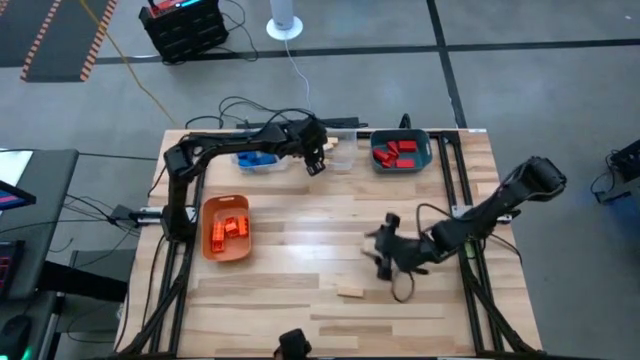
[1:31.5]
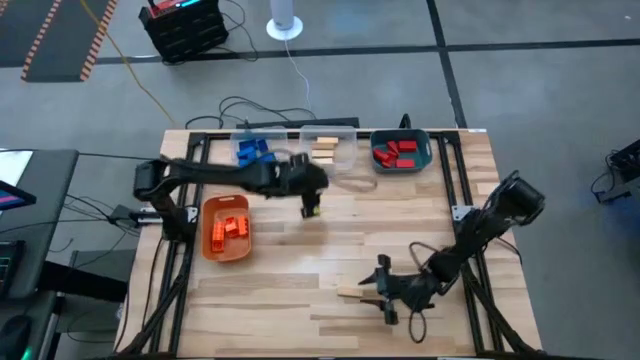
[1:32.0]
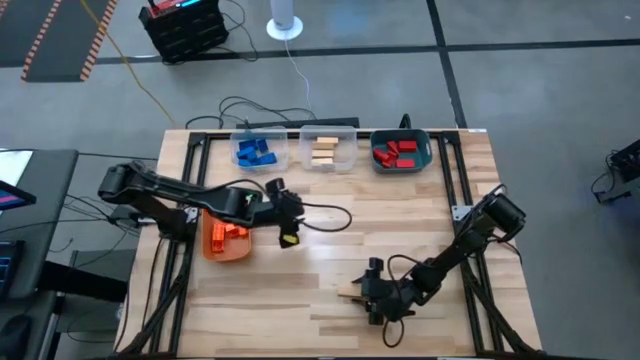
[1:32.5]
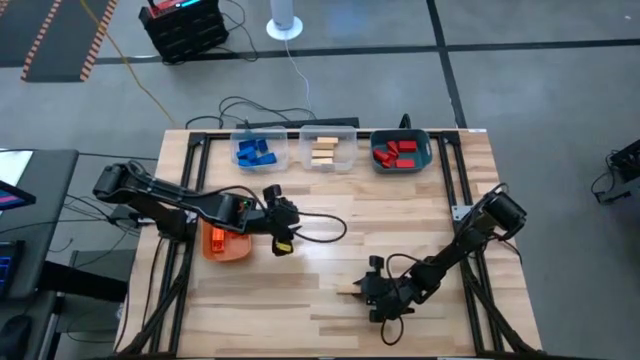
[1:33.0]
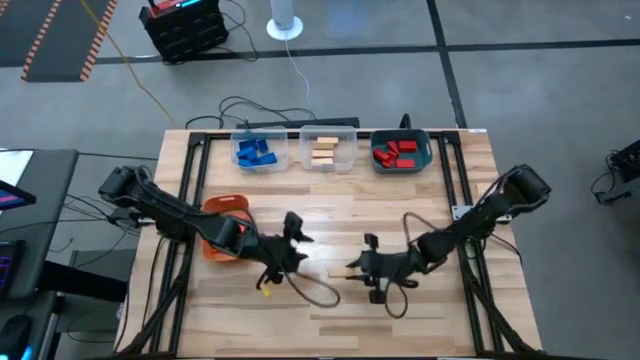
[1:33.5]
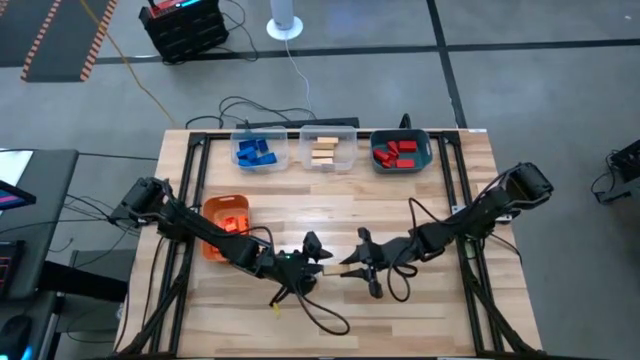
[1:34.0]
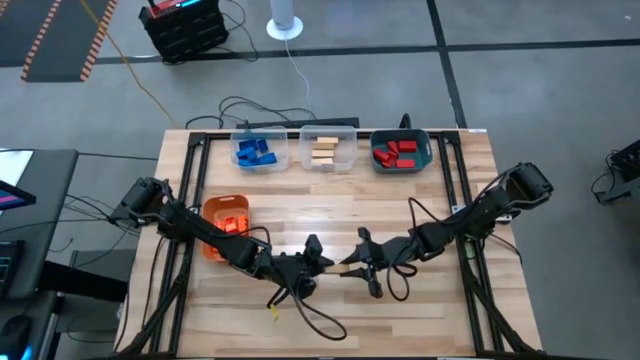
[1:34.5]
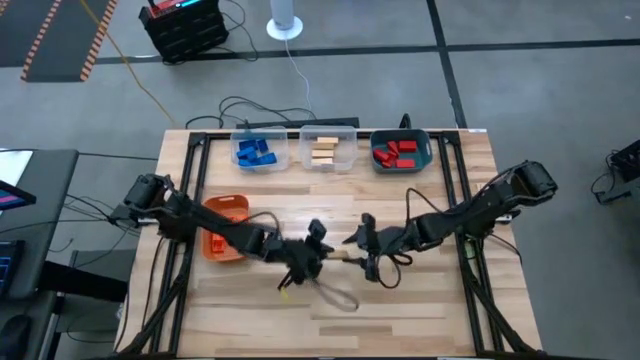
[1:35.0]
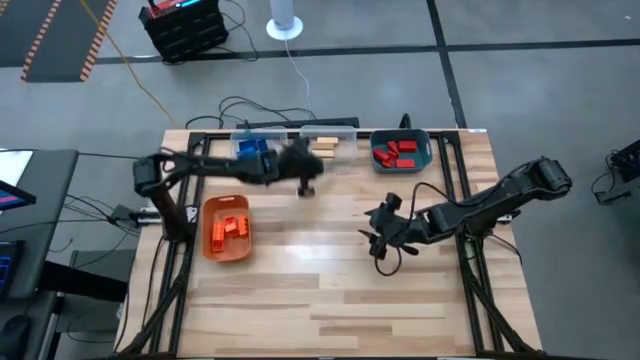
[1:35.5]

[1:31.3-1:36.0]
Task: Sort blocks
Put the light brown block into the right transparent bin

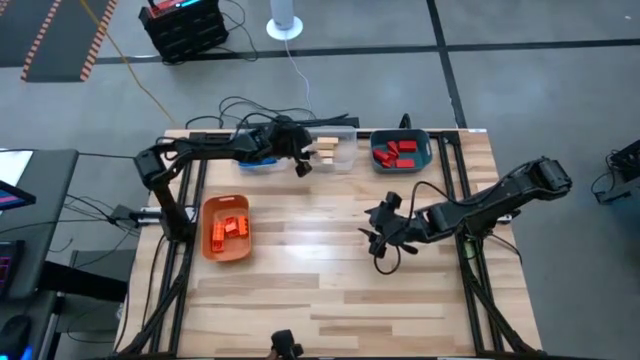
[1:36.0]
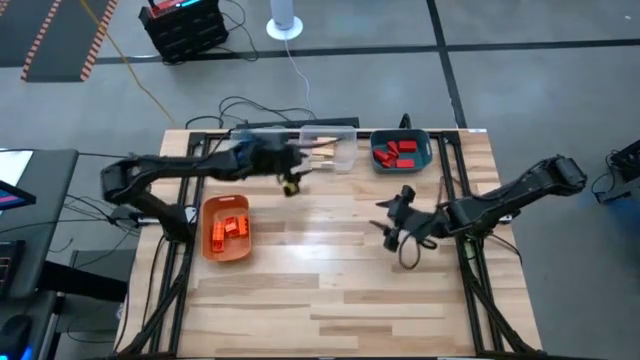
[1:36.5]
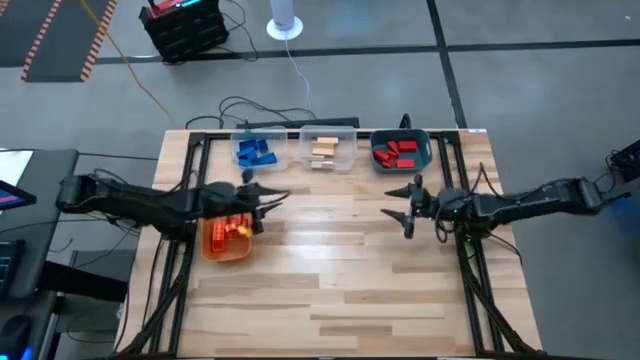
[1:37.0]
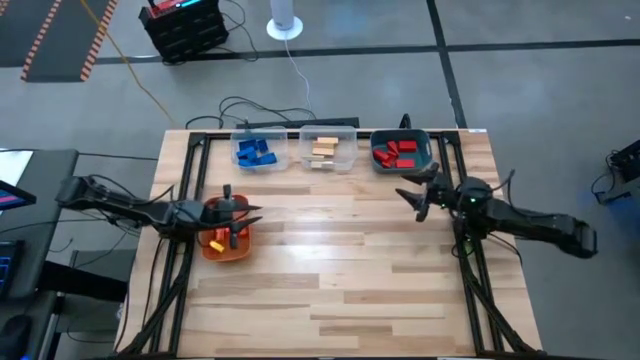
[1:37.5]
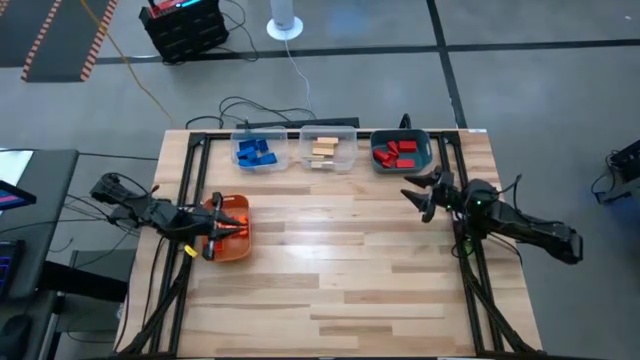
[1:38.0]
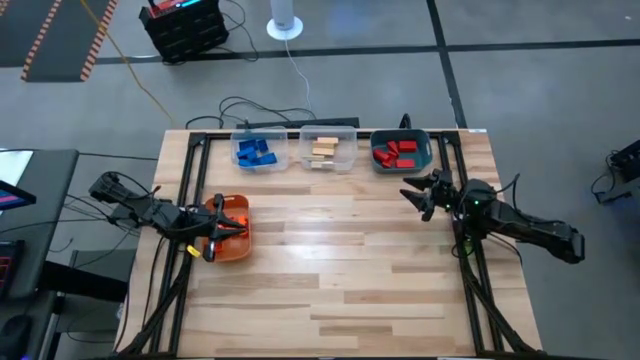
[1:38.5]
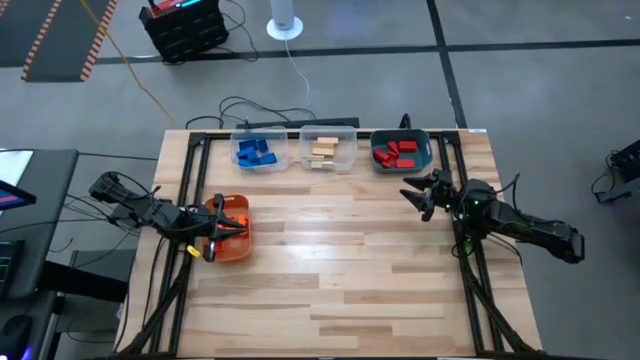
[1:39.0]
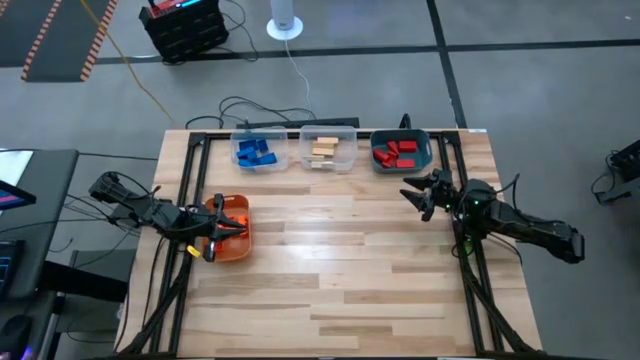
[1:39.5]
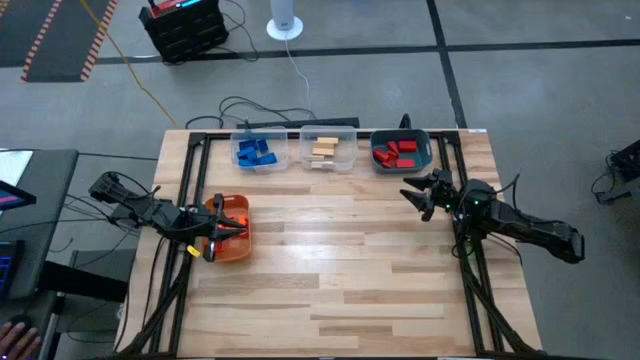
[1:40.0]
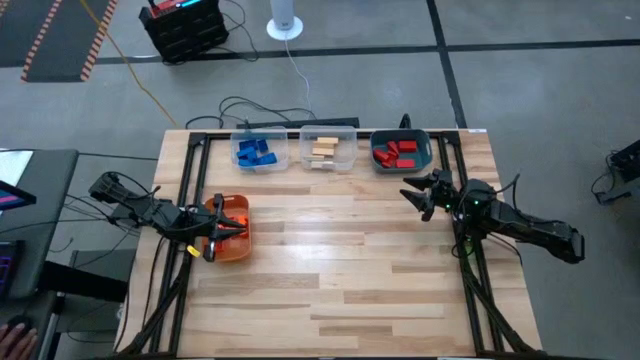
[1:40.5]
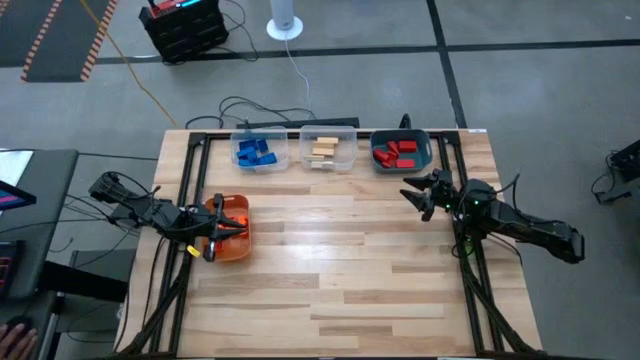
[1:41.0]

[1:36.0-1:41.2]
Return to Home Position

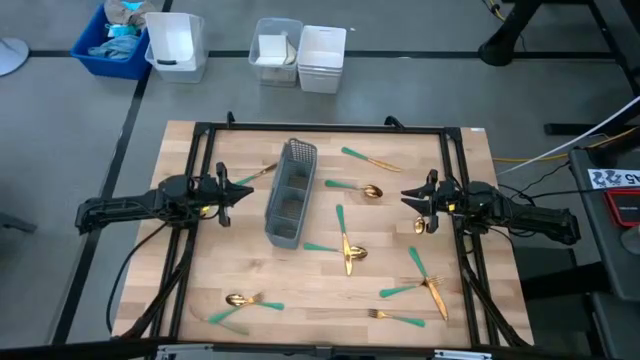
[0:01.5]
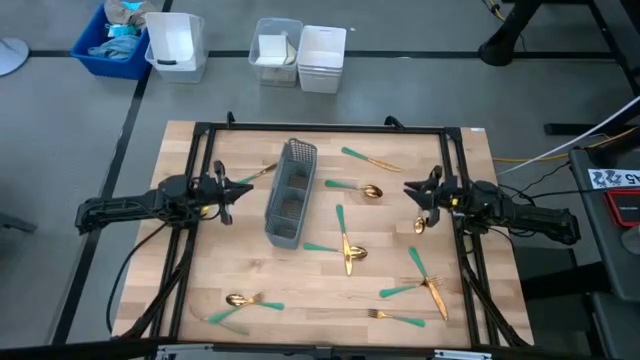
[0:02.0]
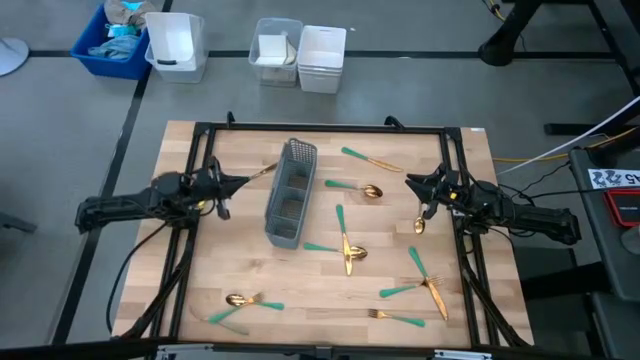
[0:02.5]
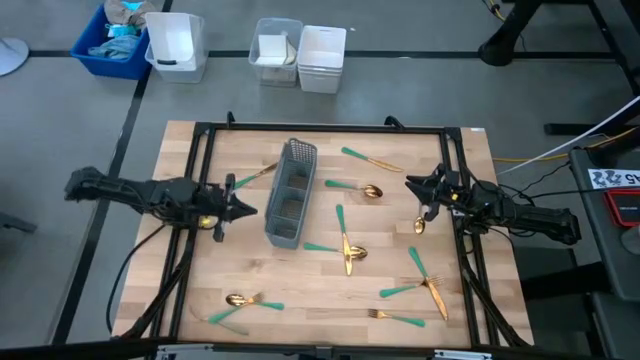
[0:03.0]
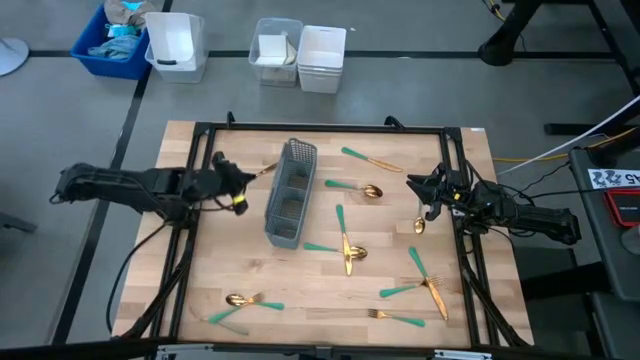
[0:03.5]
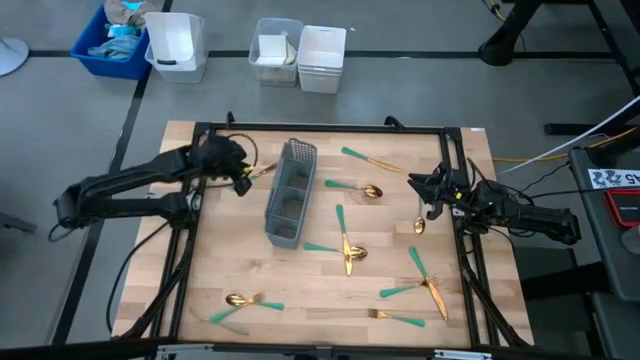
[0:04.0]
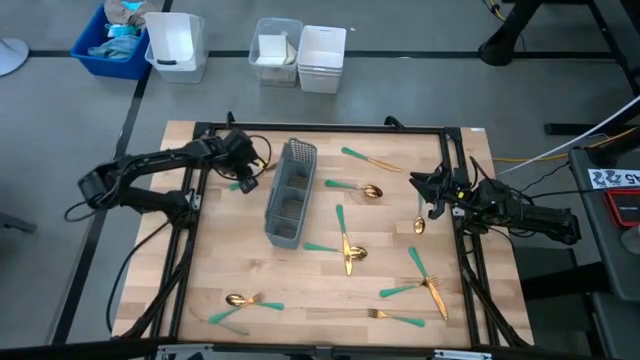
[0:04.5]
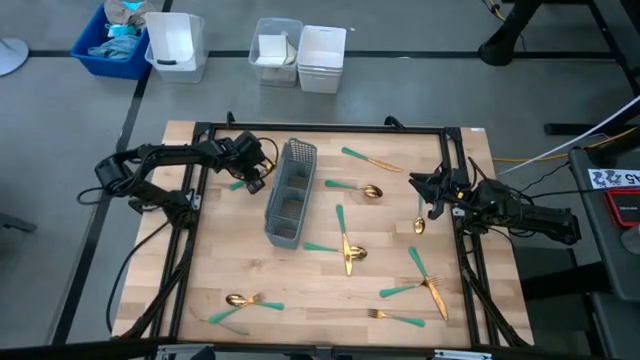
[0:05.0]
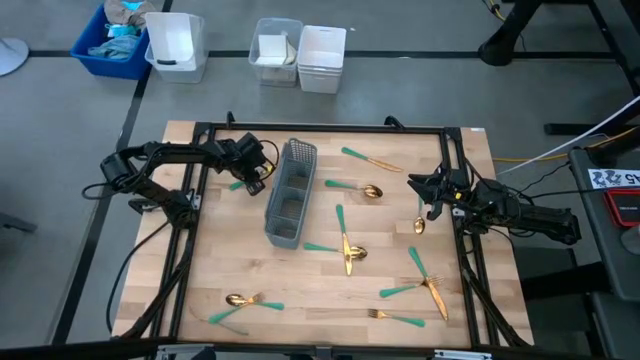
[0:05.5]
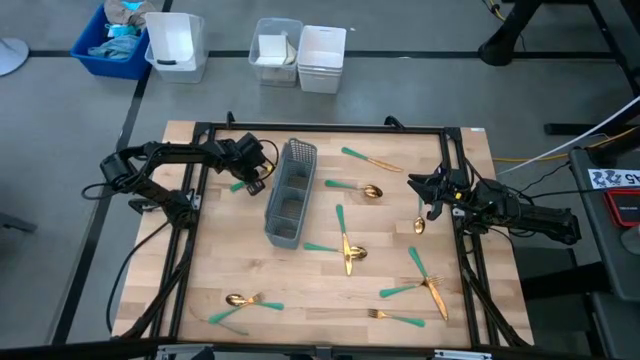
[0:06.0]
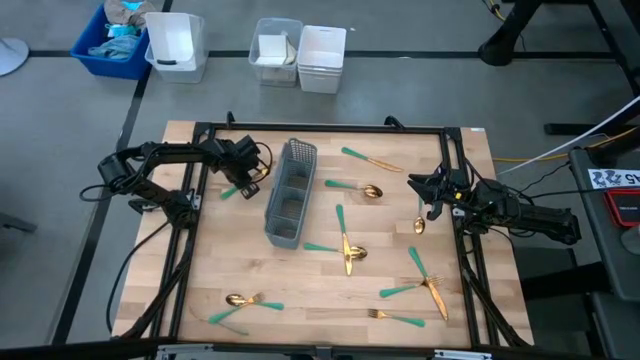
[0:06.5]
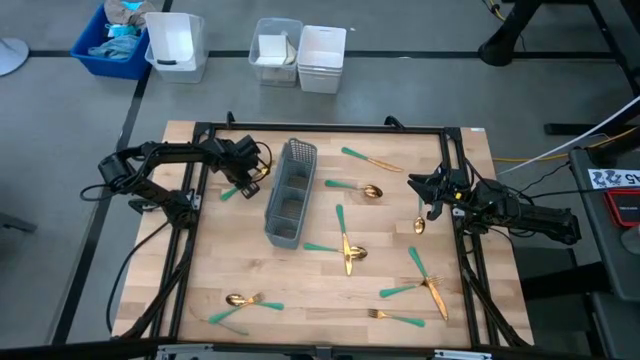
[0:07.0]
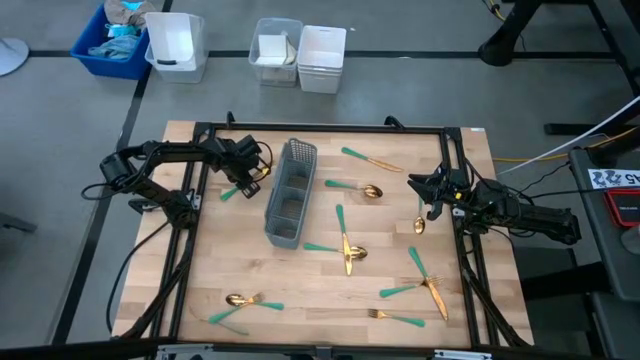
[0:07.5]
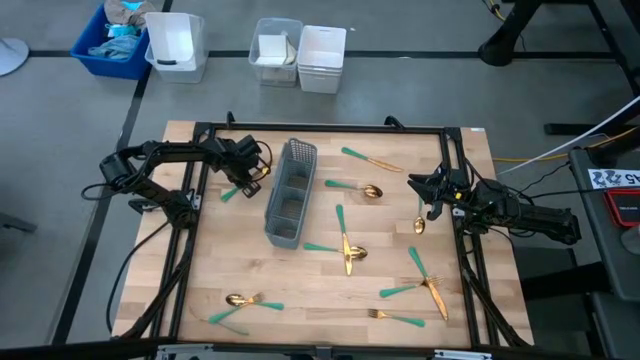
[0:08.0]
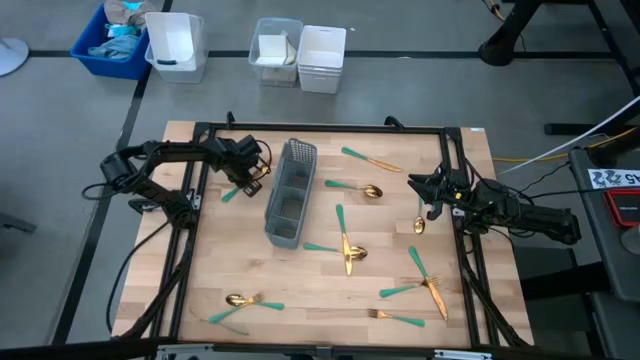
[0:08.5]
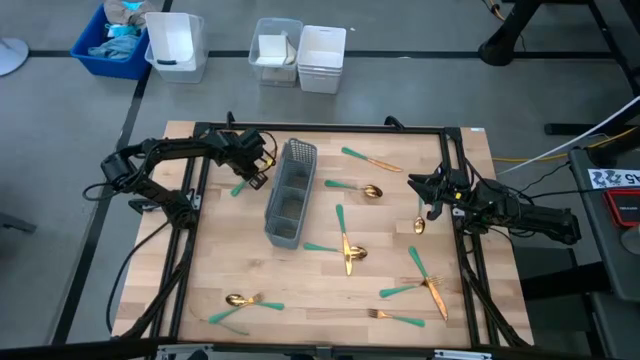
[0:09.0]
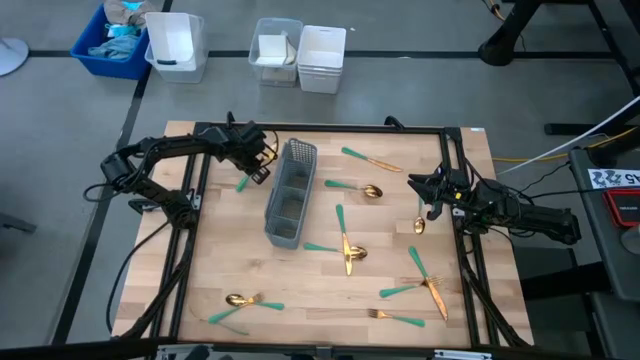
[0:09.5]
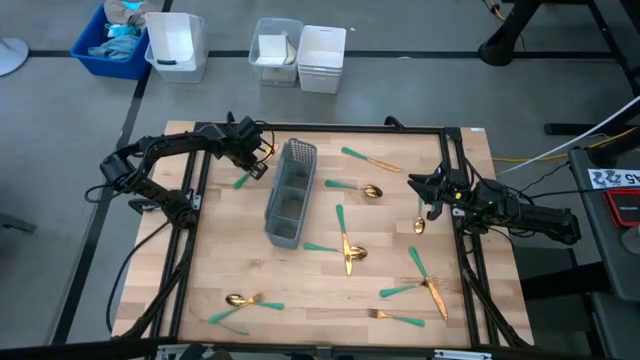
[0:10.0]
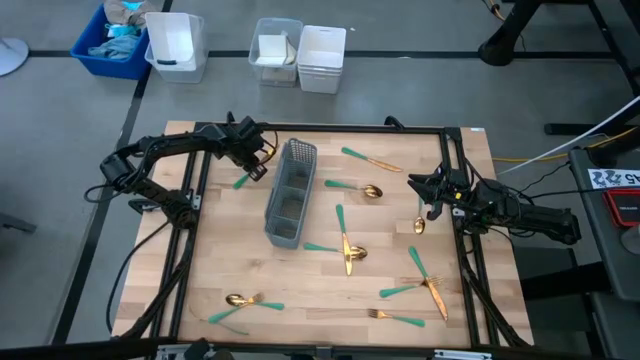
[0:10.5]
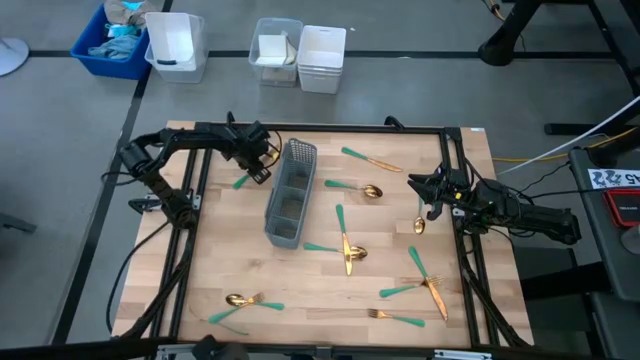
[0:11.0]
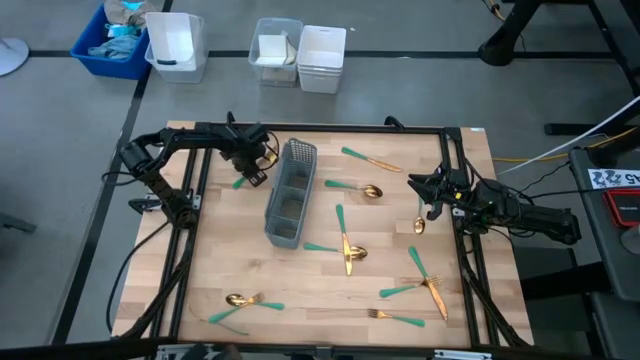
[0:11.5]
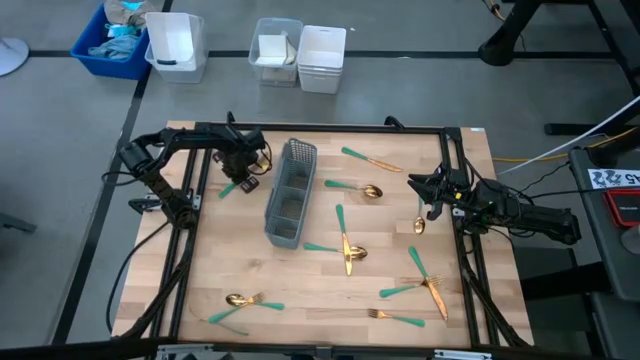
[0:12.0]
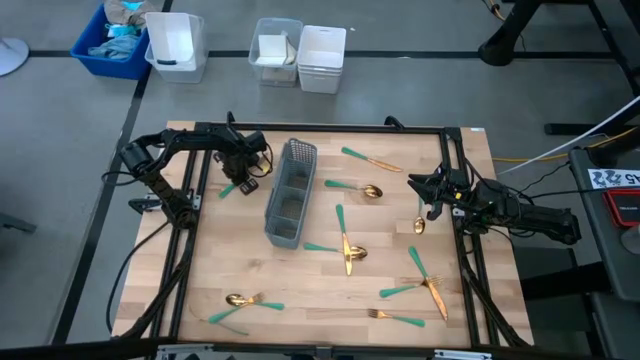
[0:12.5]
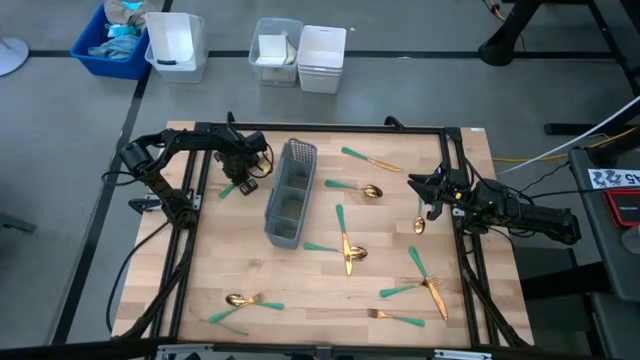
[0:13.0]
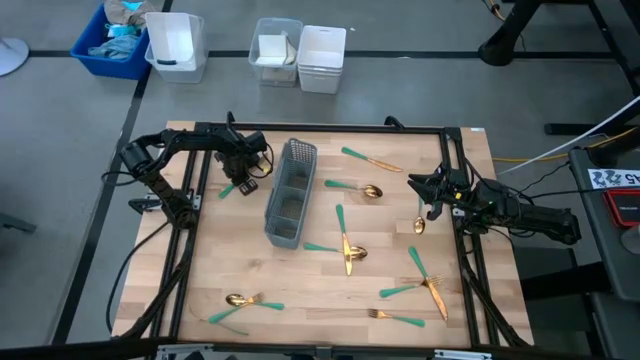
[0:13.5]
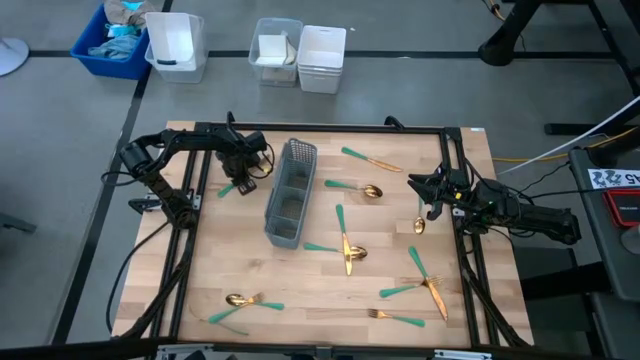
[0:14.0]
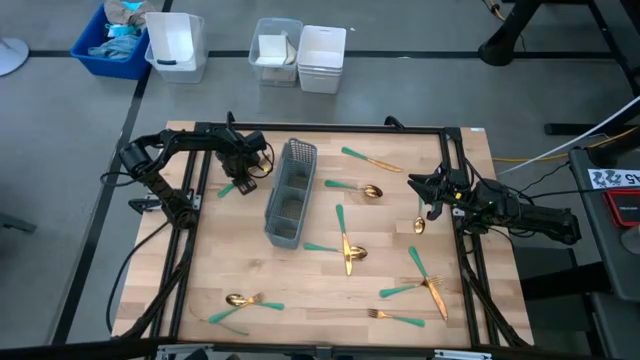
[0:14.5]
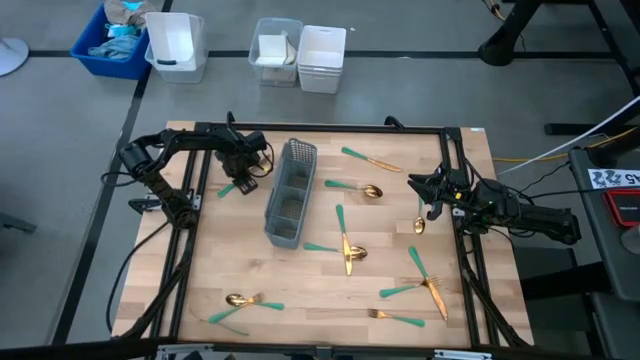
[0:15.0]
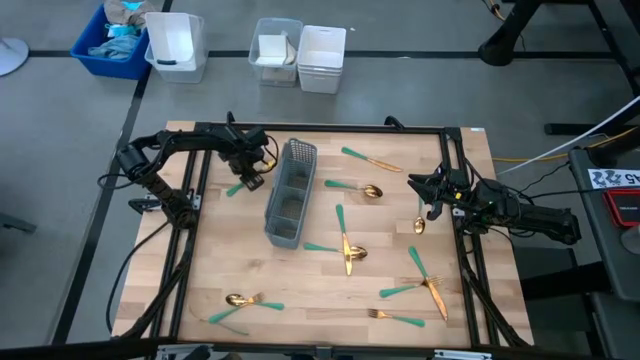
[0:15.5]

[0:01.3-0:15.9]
Task: Sort silverware
Put the green table knife into the gray silverware rack
